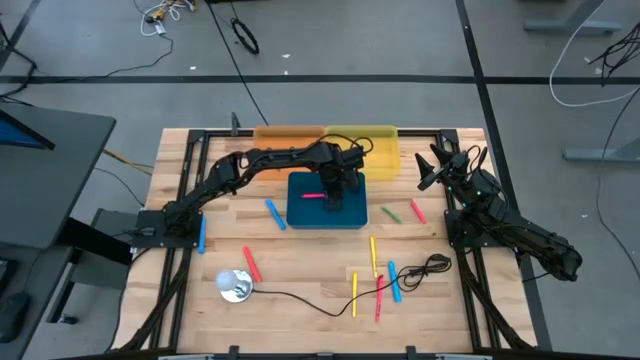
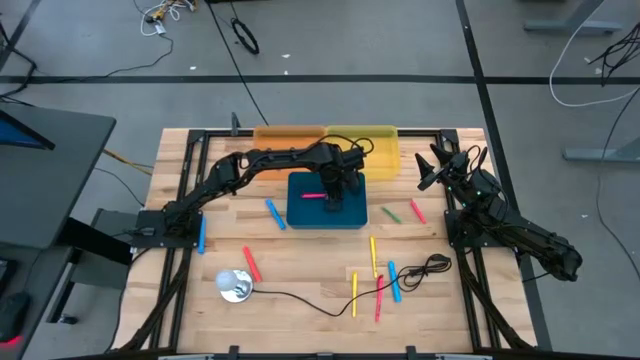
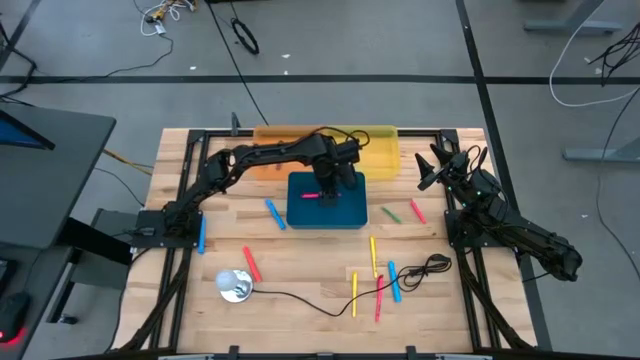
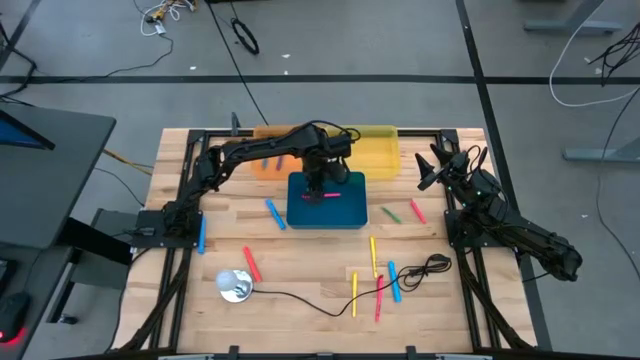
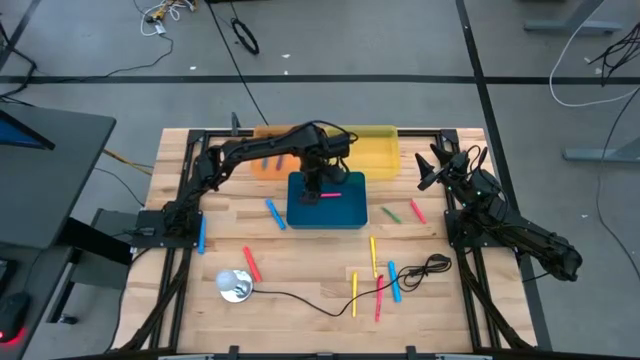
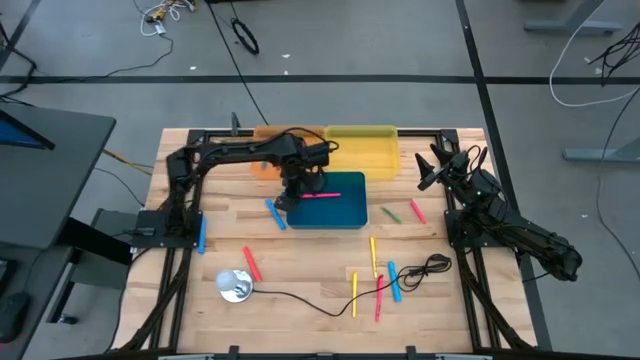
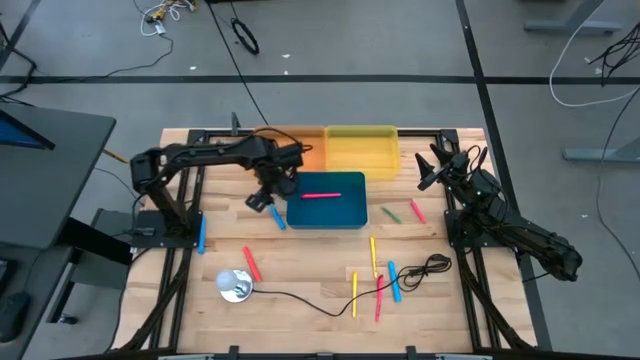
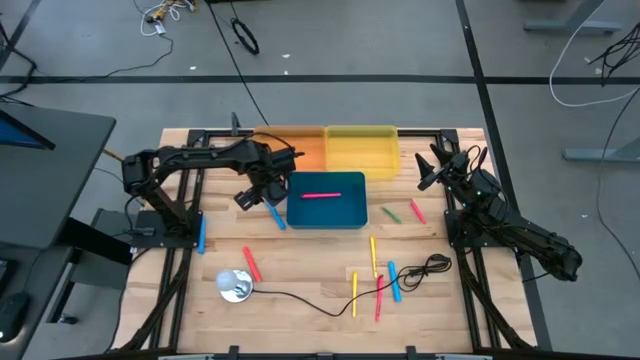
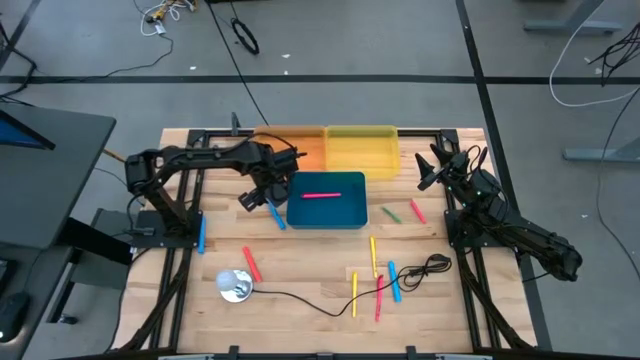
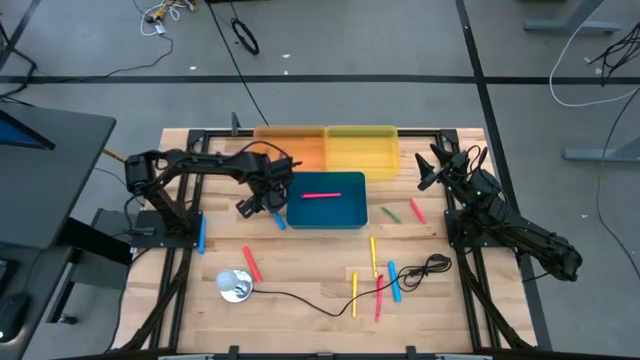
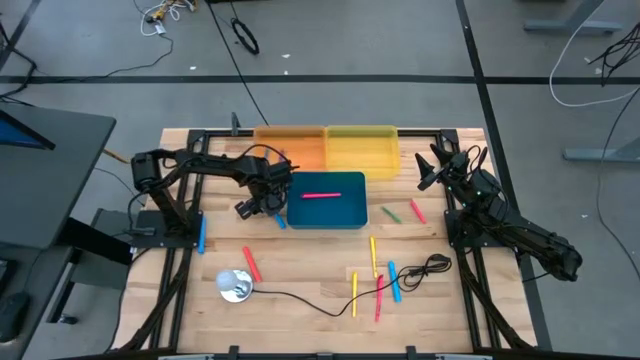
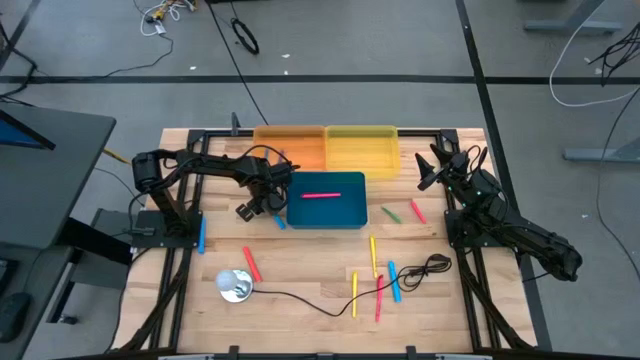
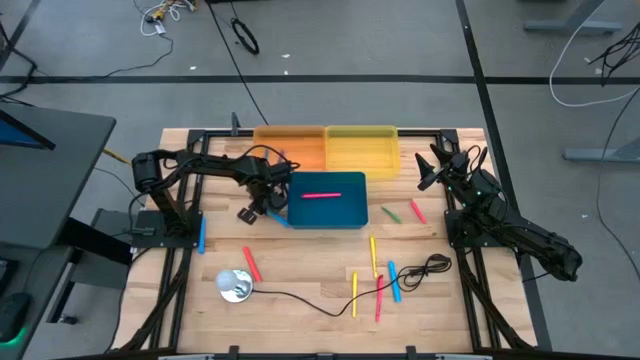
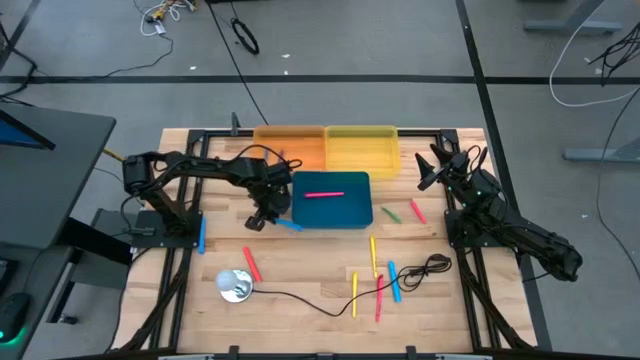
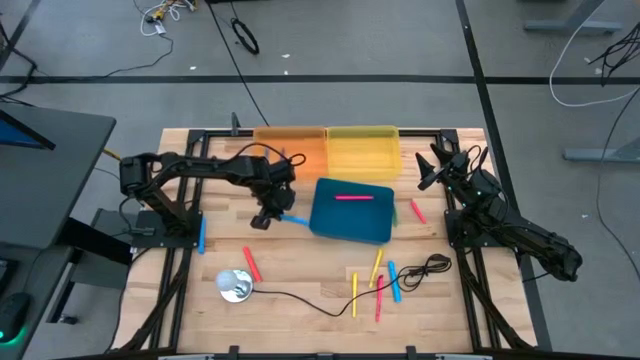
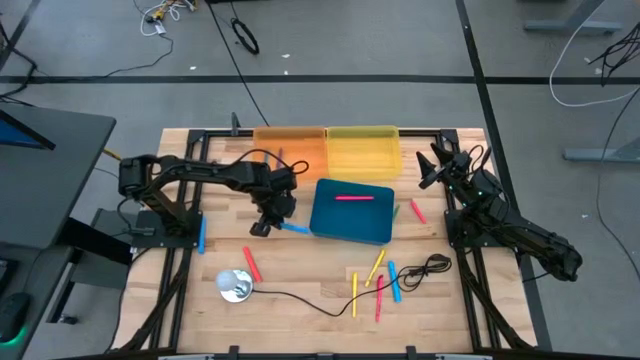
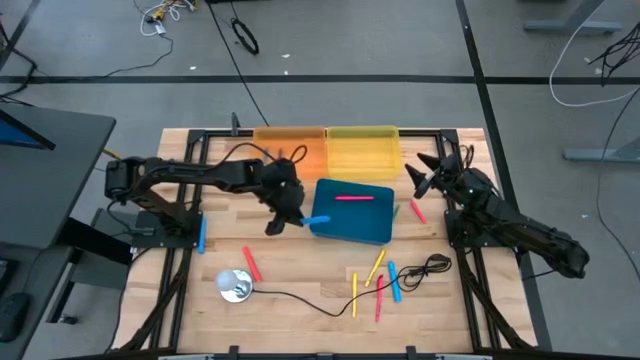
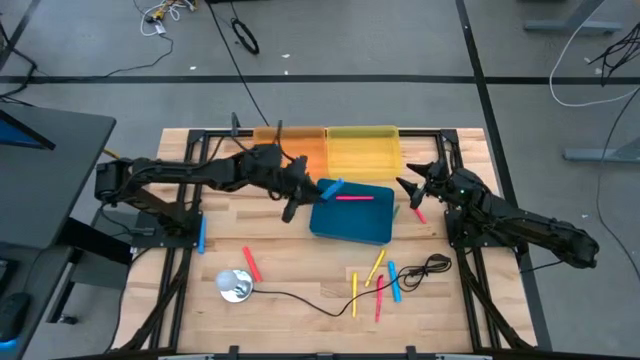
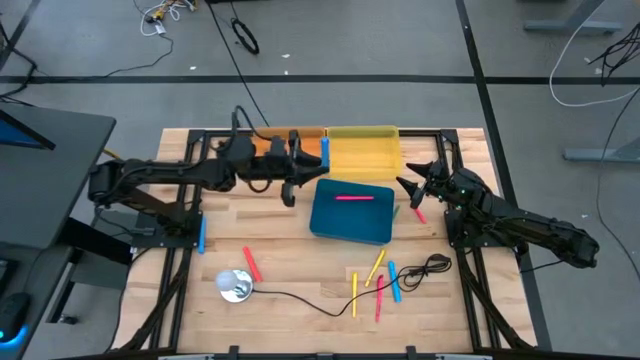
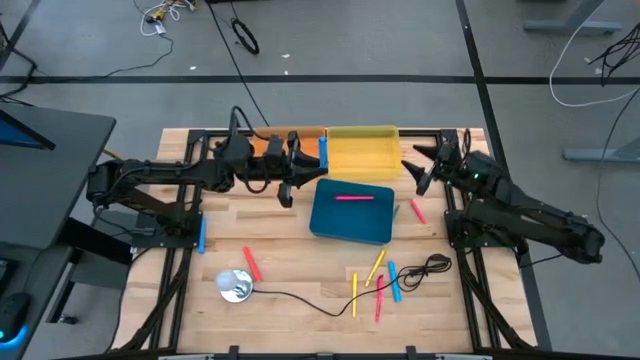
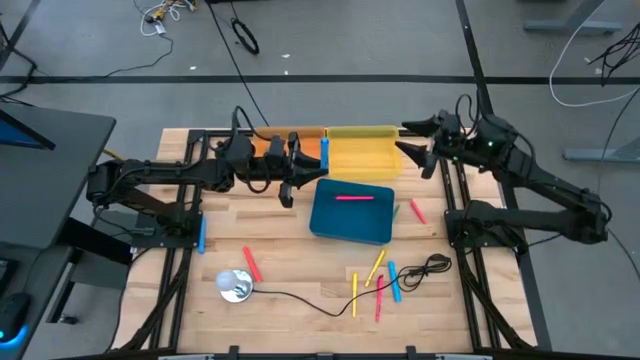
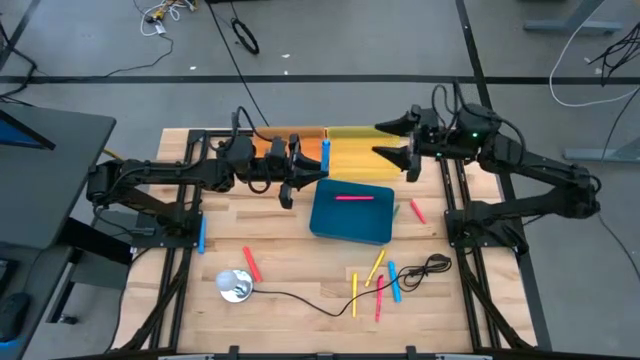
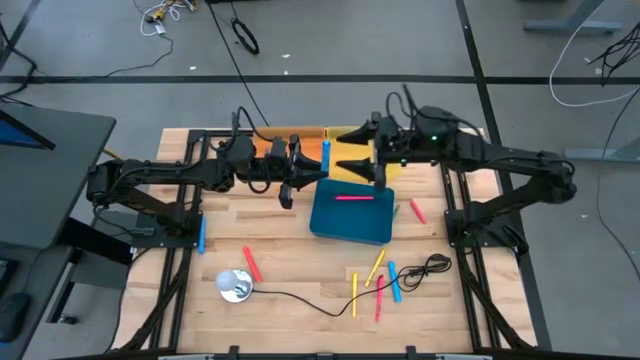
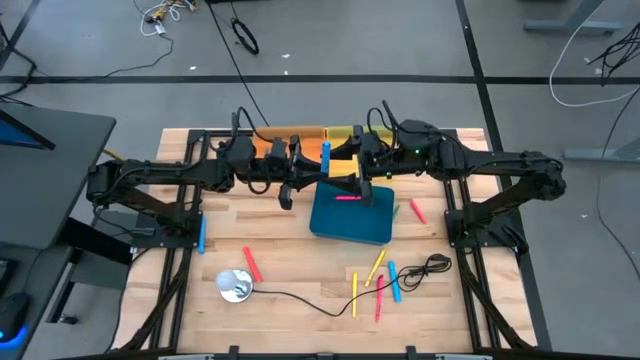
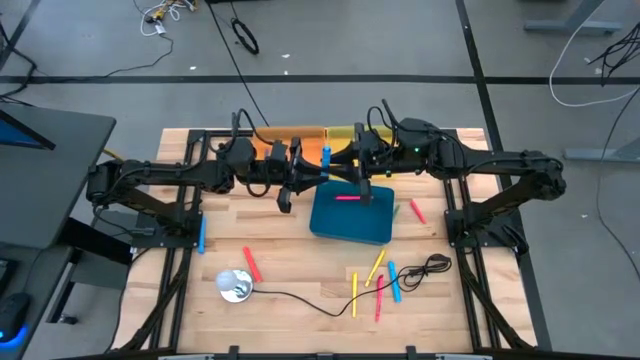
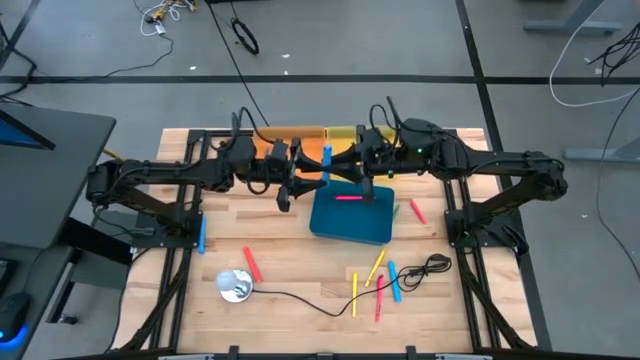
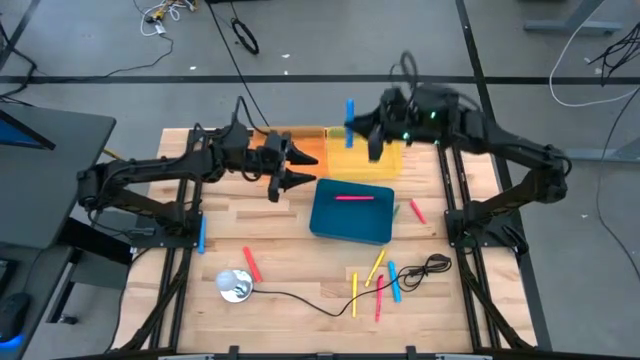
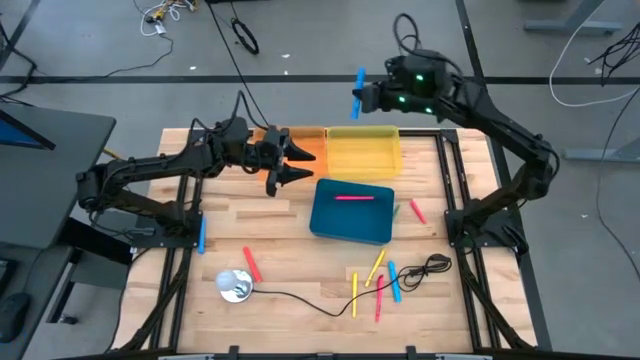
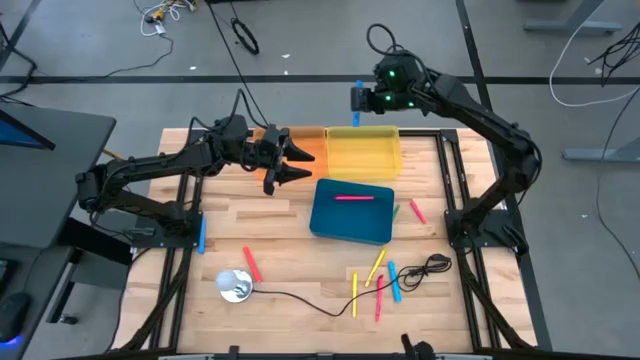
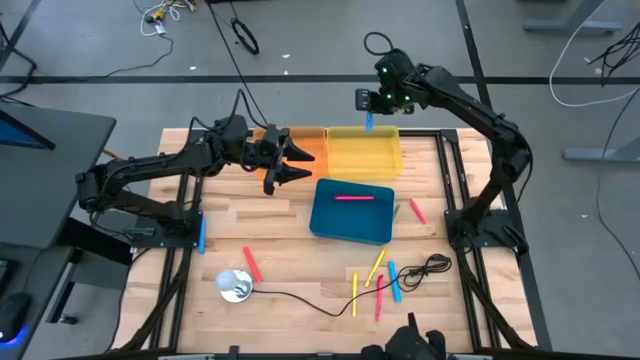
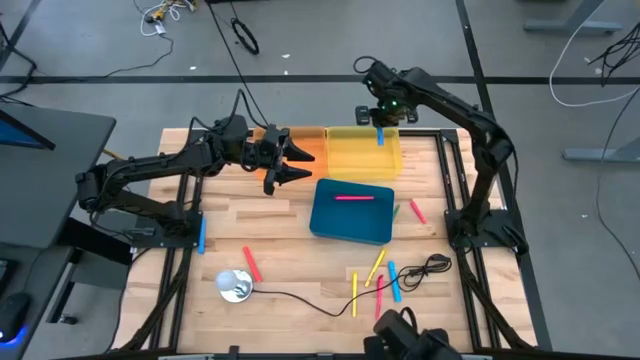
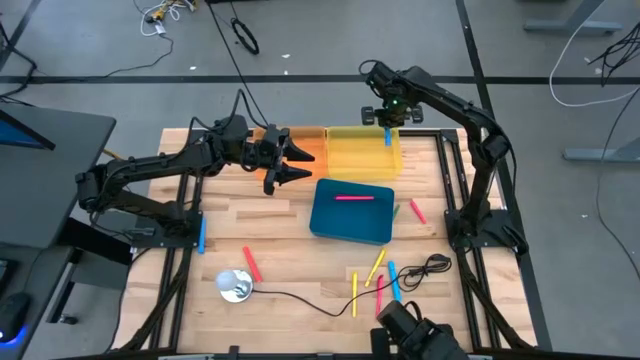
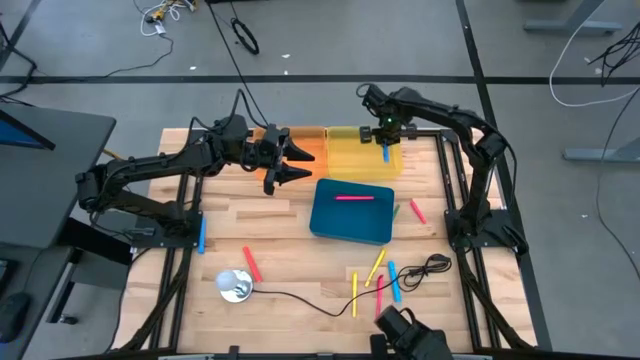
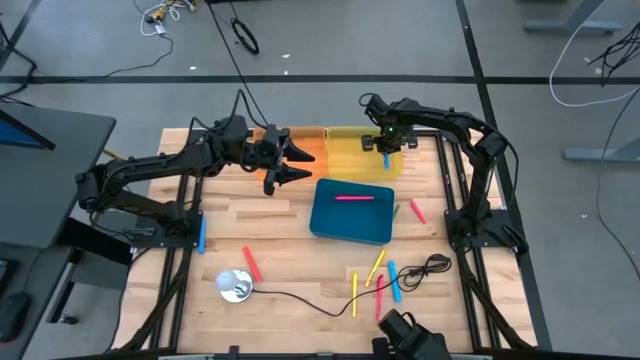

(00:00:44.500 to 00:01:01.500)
Task: Pick & Place Markers
Put the blue marker into the transparent yellow bin

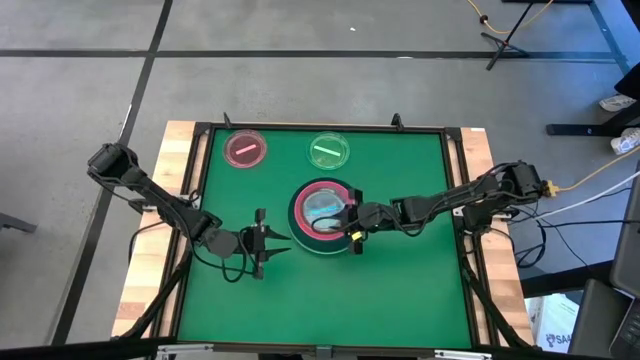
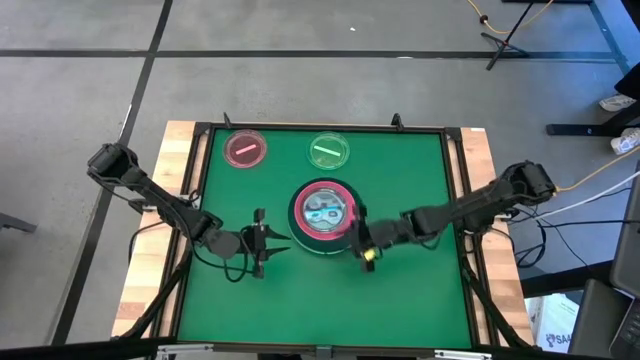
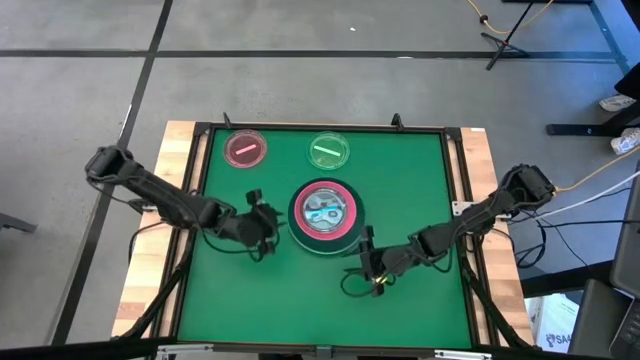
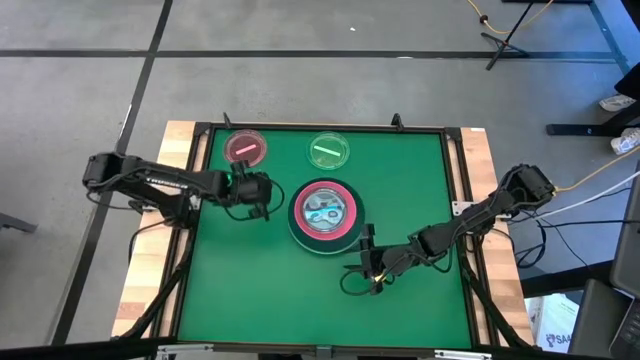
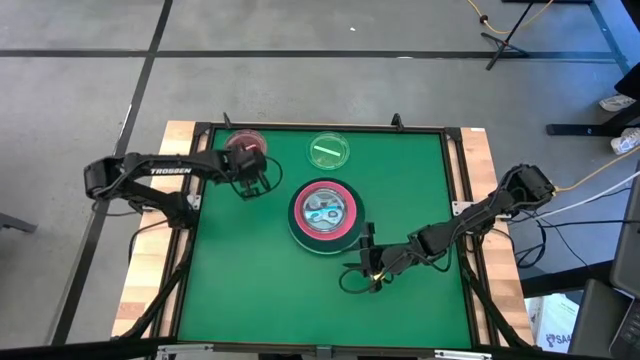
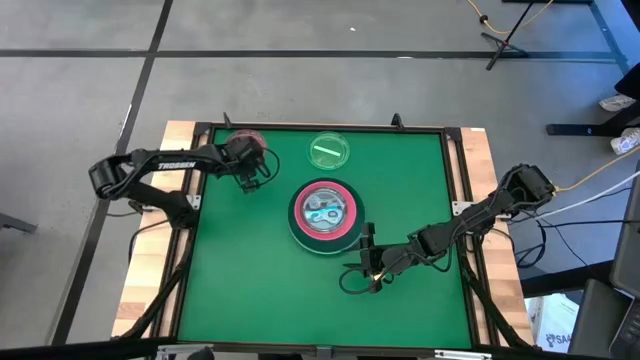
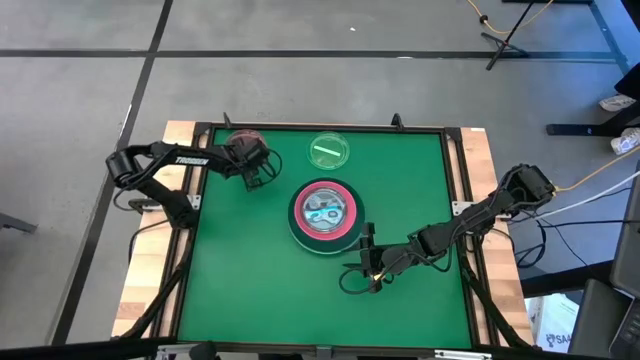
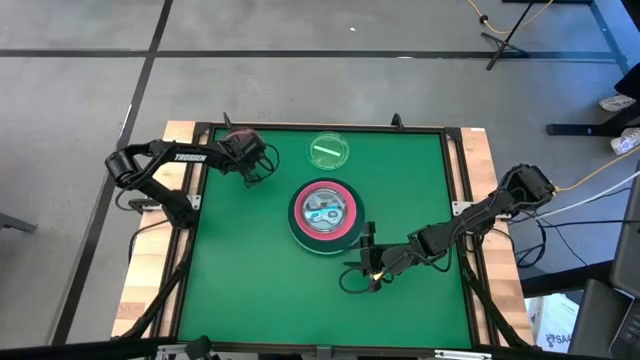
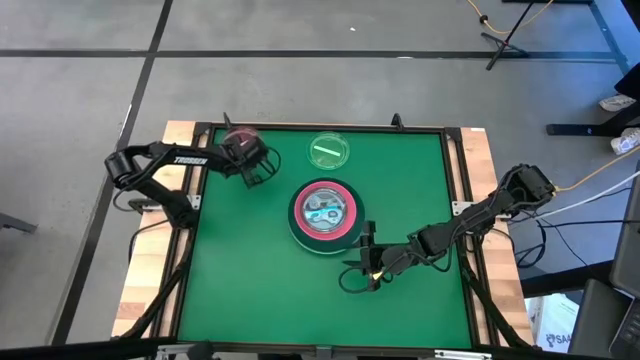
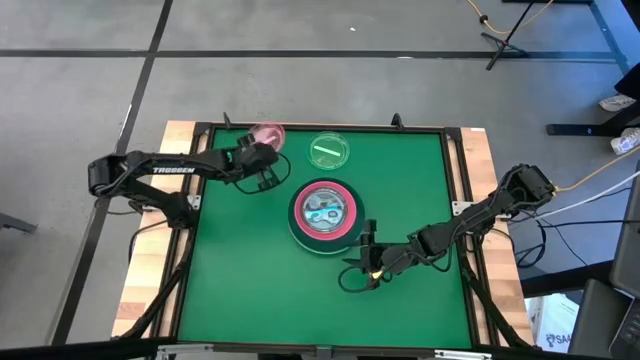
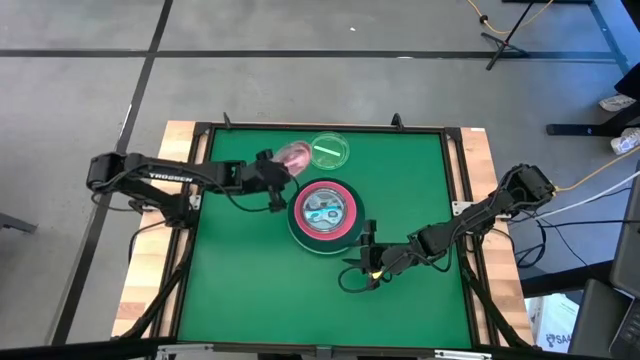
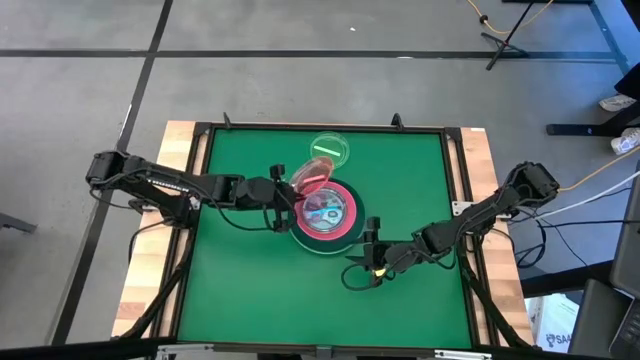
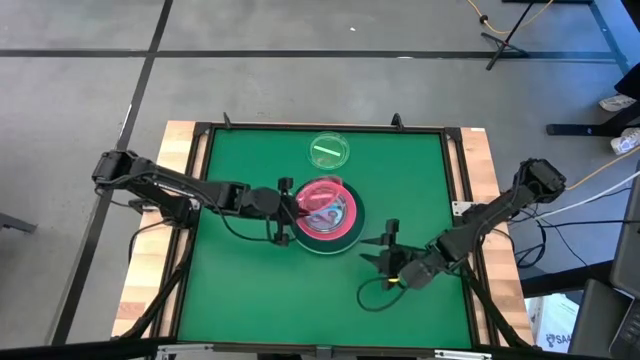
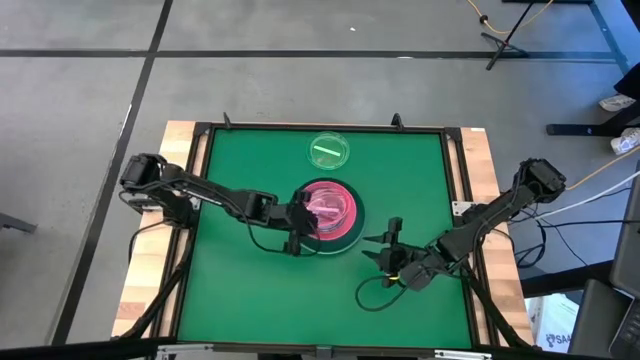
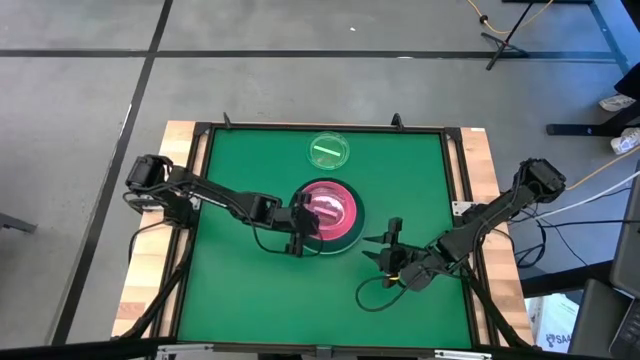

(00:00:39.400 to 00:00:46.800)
Task: Stack plastic plates
Stack the pink transparent plate on the blue transparent plate
